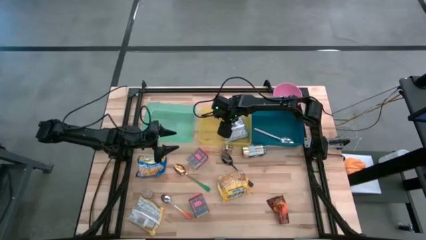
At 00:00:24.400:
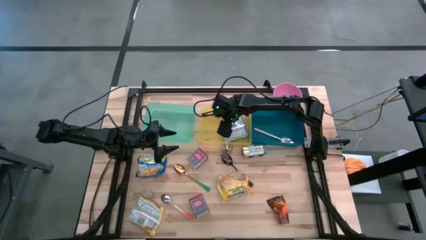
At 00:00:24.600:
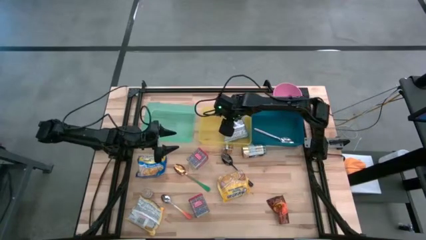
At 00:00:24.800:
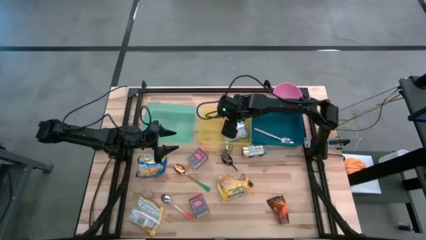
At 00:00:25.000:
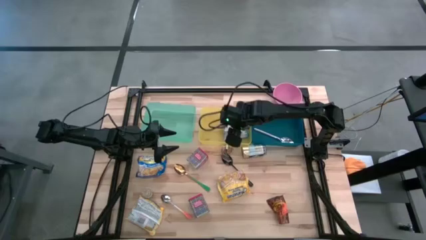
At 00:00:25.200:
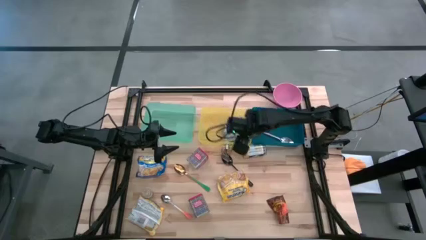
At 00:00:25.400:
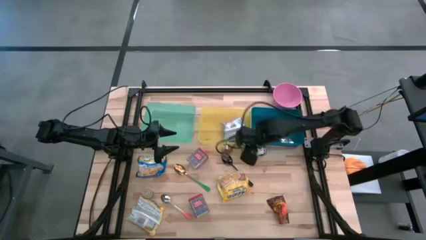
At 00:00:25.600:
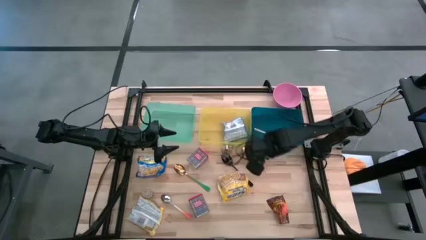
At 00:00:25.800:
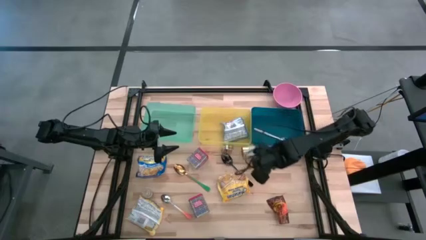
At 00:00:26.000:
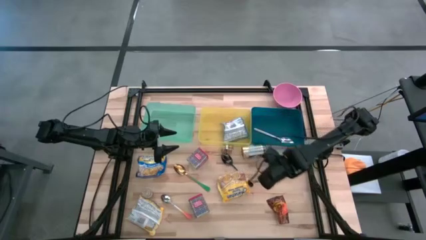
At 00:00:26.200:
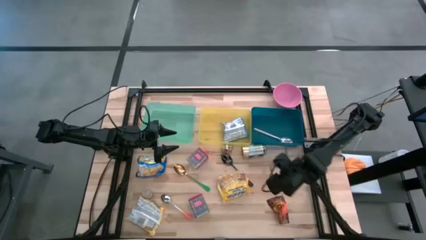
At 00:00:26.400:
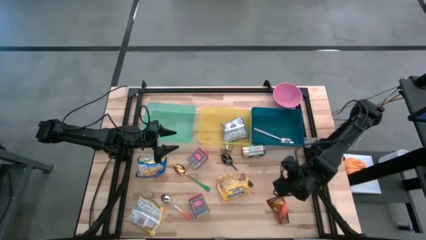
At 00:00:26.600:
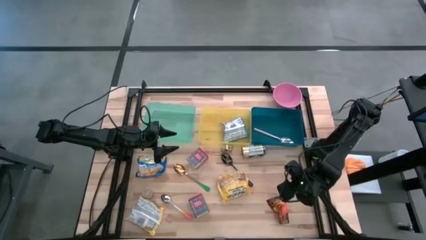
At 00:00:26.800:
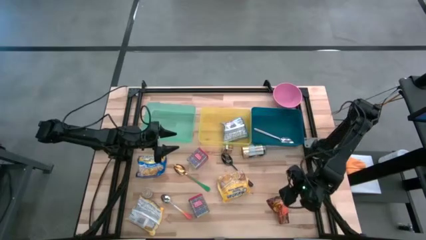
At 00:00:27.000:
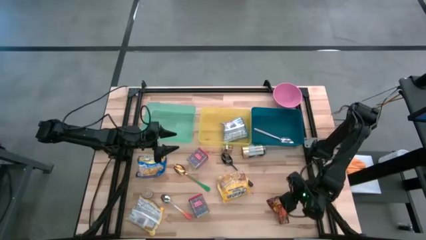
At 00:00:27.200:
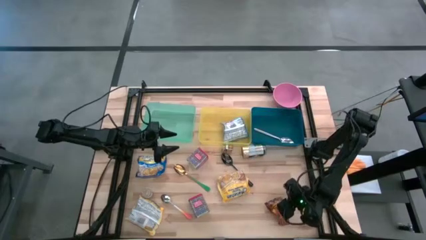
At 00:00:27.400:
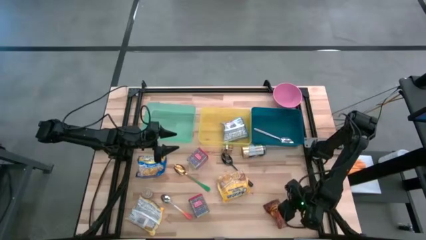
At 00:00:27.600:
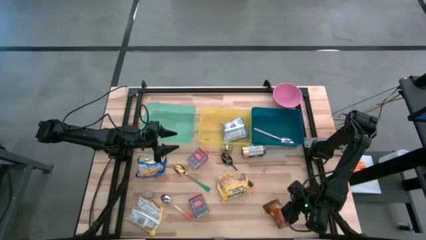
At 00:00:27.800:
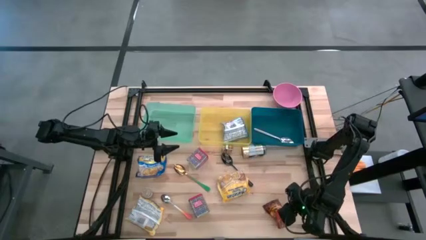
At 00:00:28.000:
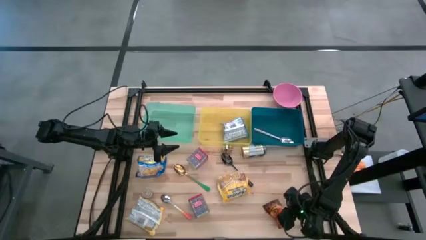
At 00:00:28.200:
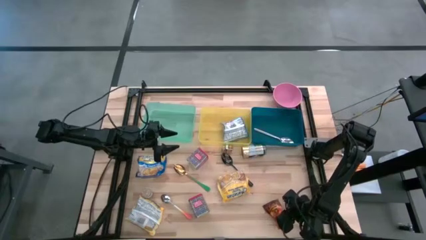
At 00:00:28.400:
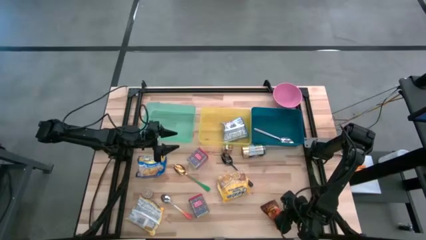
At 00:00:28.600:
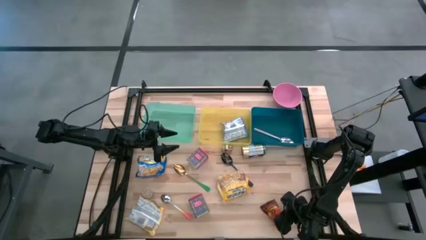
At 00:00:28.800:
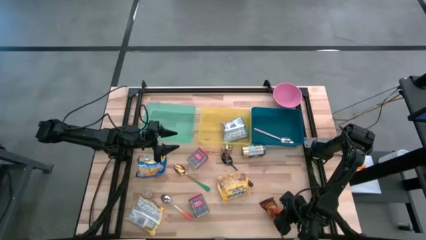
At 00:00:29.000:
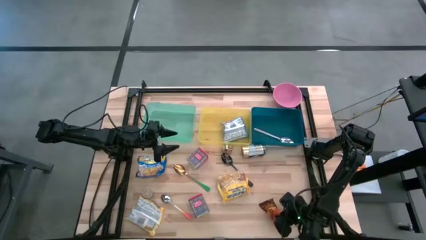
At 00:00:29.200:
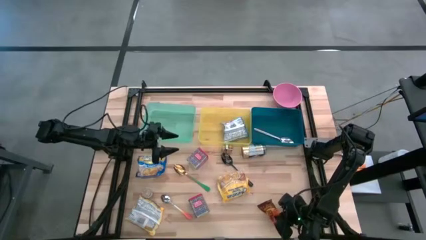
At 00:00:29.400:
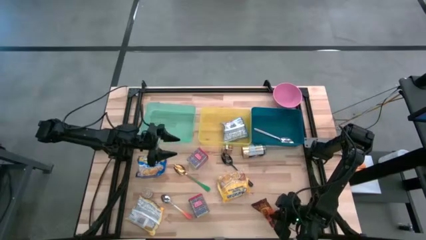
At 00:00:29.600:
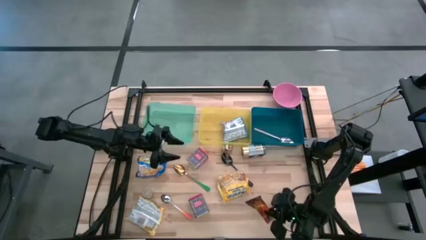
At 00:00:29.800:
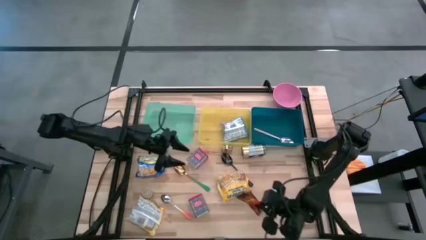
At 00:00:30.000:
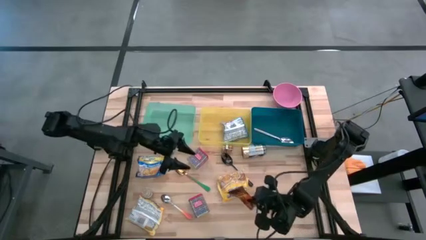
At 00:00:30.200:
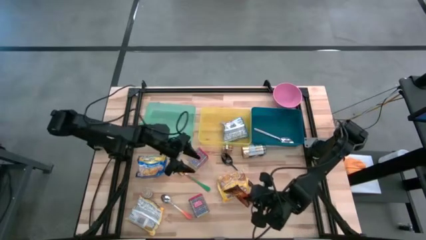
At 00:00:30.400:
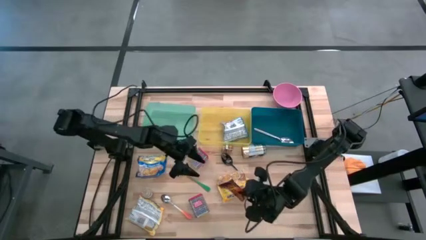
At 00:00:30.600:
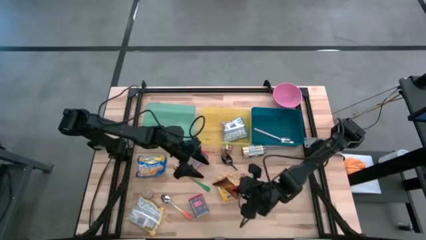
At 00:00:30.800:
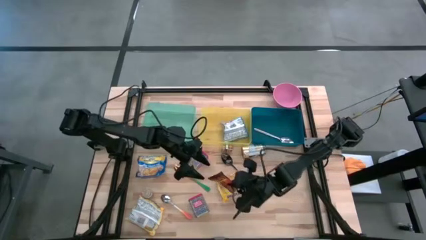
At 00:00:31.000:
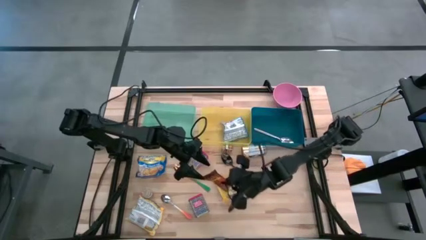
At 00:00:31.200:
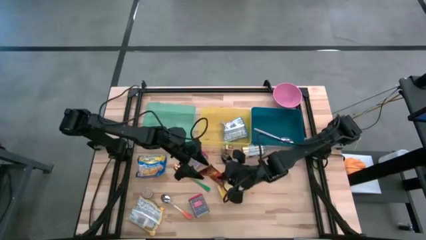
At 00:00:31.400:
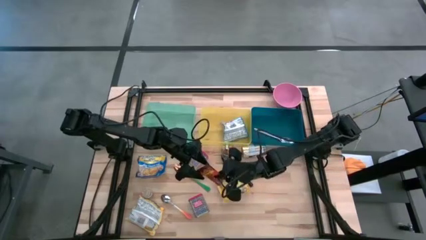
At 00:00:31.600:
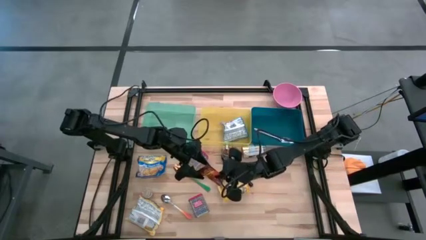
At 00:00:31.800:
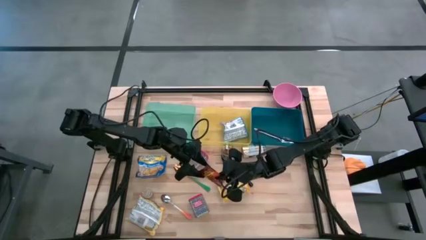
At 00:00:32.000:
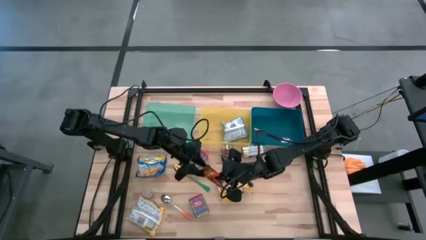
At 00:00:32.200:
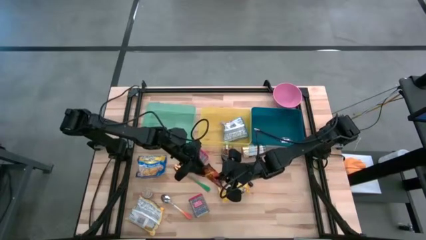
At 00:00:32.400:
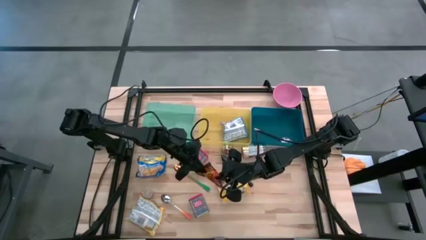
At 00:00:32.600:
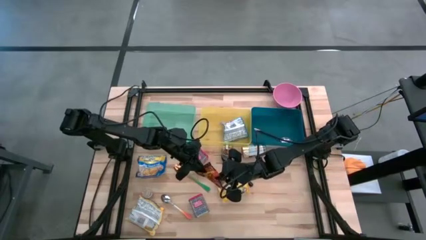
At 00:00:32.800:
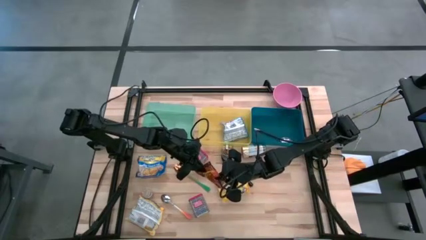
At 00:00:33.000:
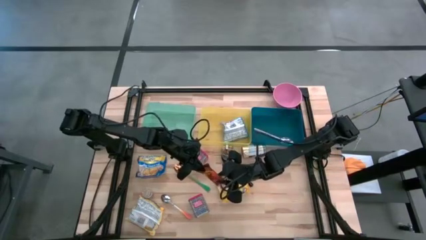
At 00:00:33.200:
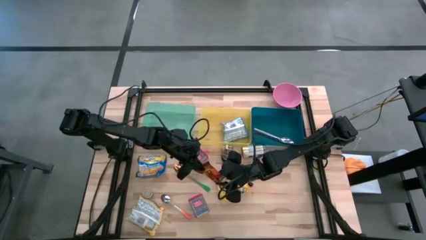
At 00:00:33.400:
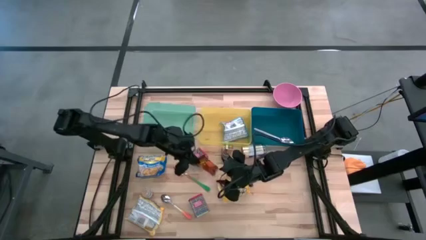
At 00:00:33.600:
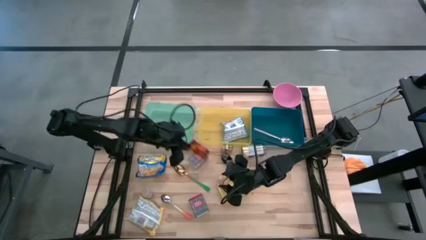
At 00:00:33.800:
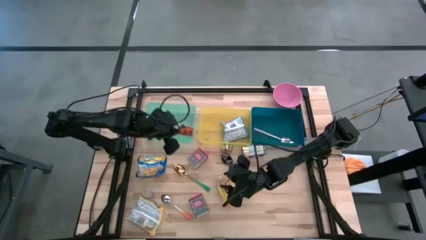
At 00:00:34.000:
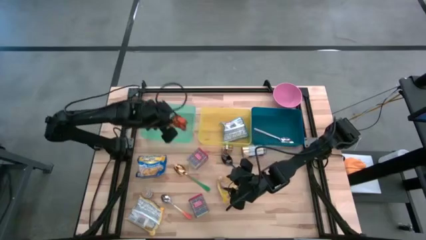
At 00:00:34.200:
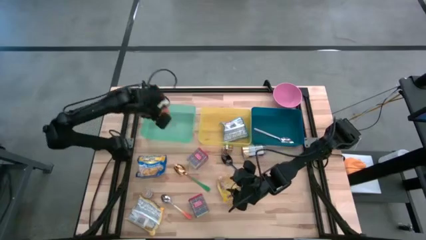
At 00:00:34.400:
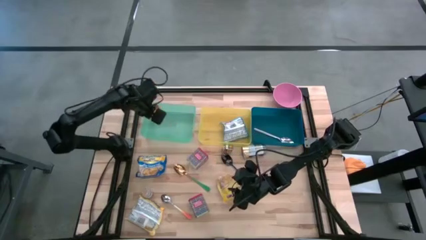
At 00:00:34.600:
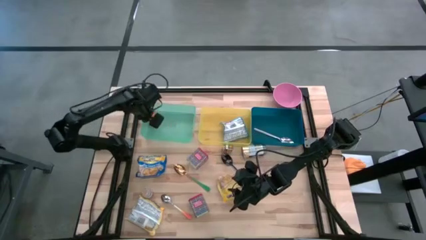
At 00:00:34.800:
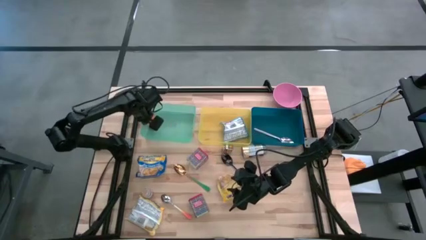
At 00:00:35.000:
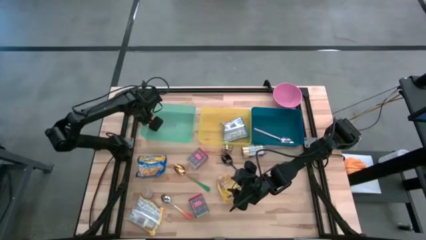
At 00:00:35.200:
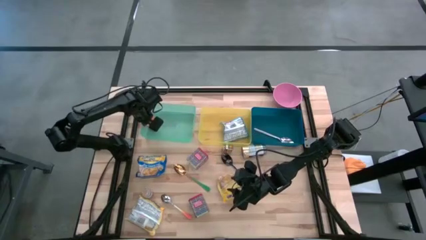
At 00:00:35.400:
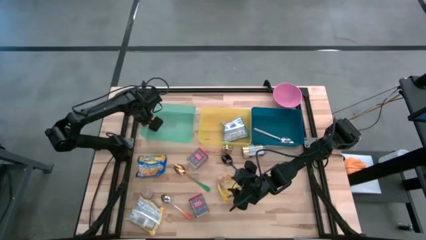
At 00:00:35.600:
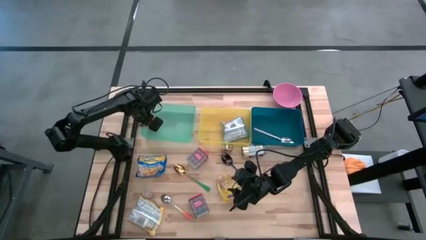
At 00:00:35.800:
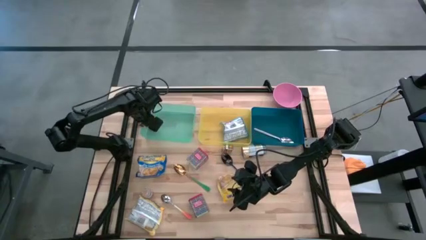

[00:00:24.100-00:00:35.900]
Put the orange seasoning pack into the green bin
